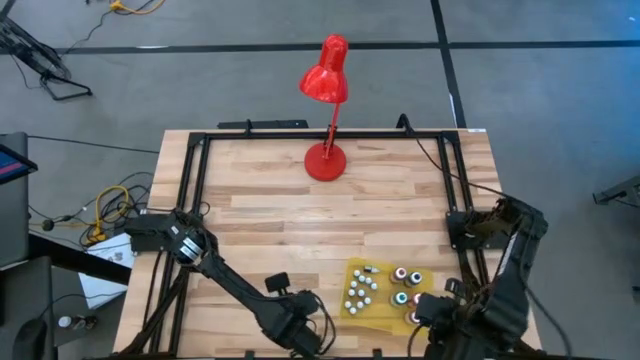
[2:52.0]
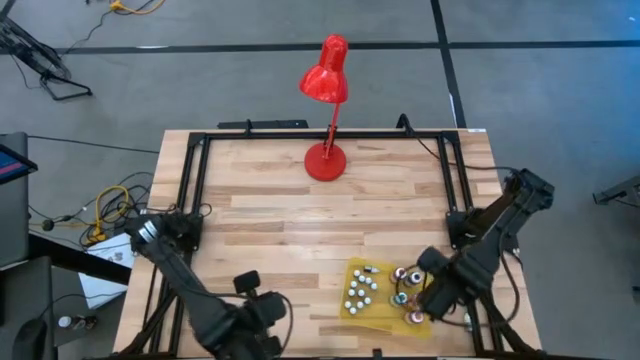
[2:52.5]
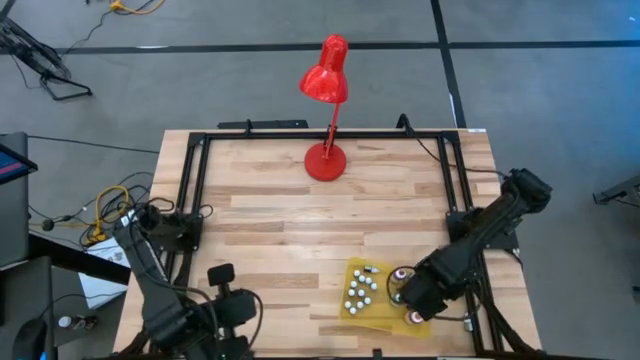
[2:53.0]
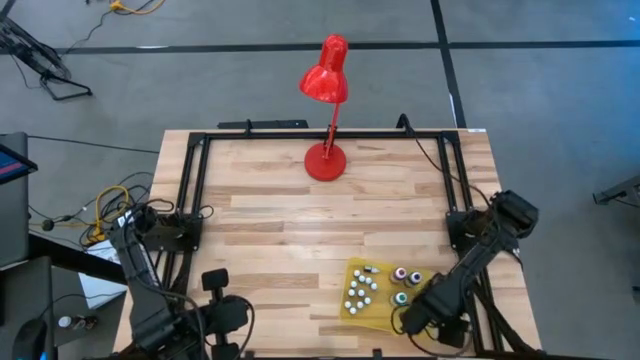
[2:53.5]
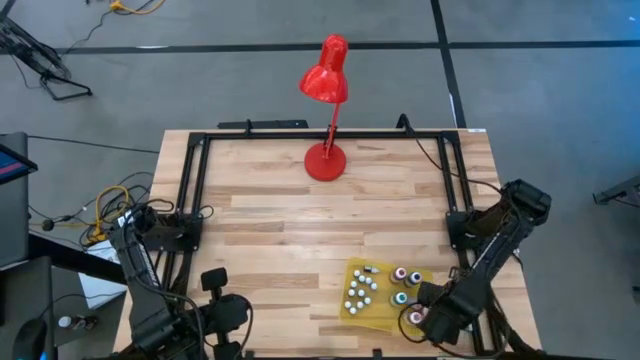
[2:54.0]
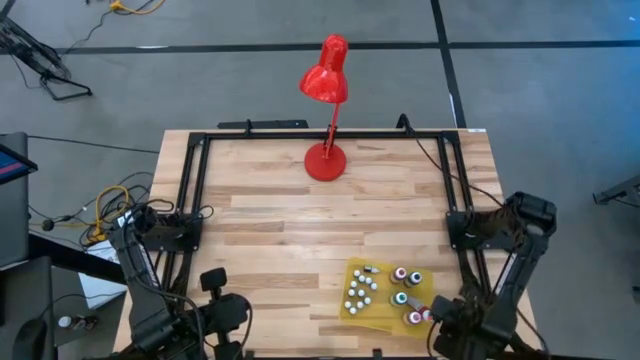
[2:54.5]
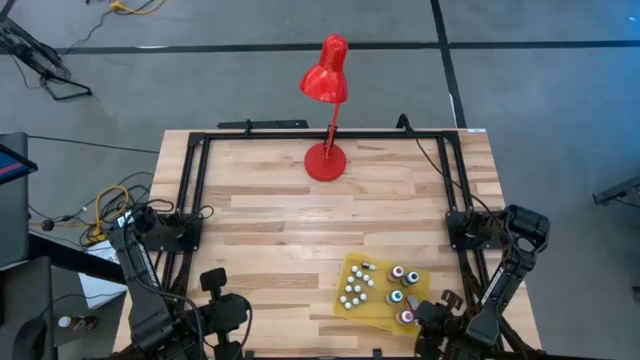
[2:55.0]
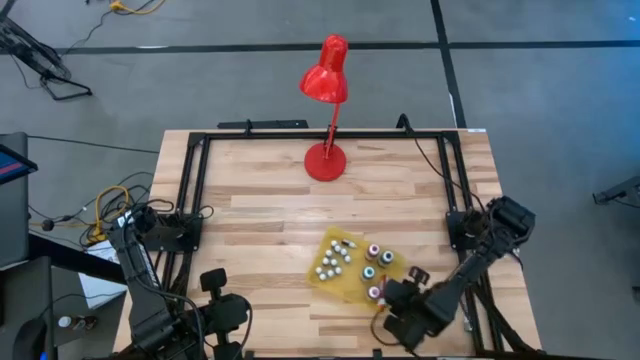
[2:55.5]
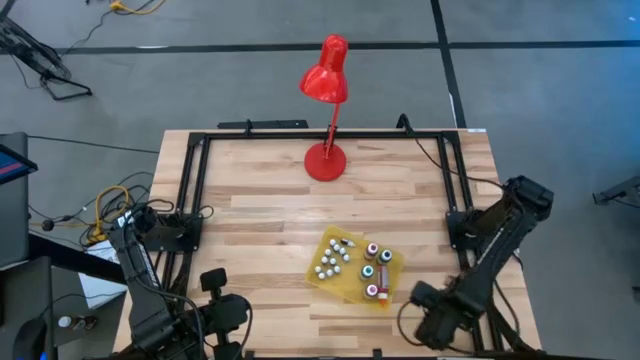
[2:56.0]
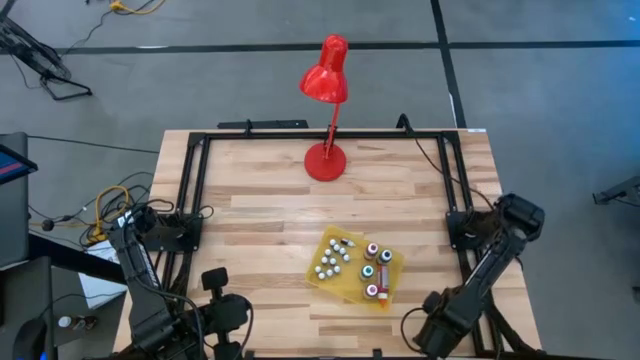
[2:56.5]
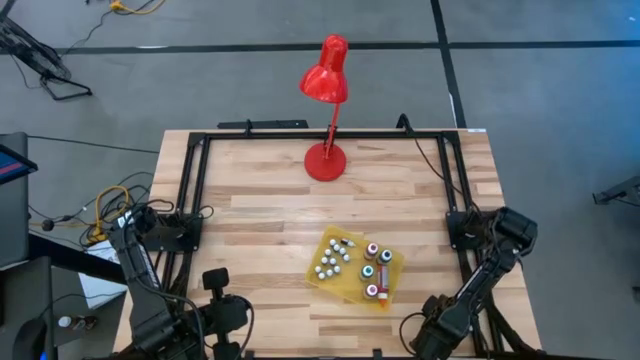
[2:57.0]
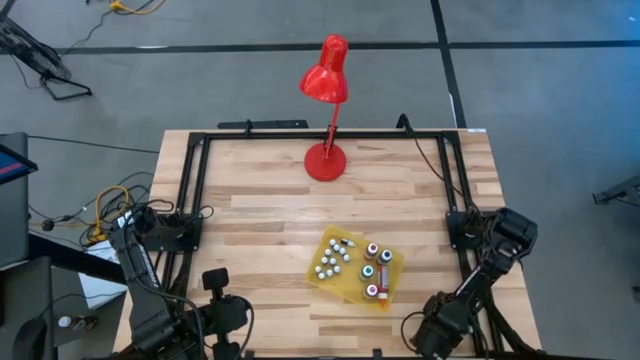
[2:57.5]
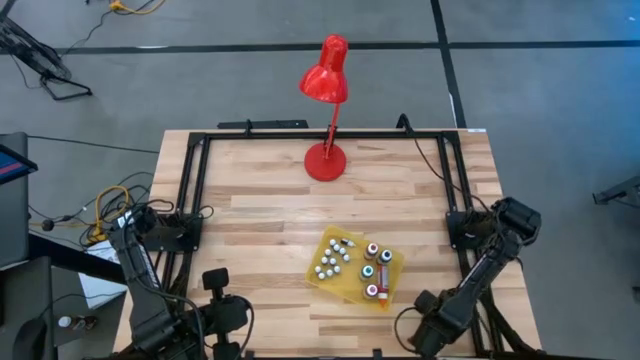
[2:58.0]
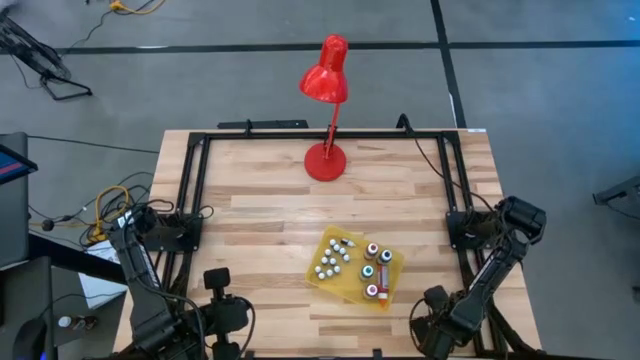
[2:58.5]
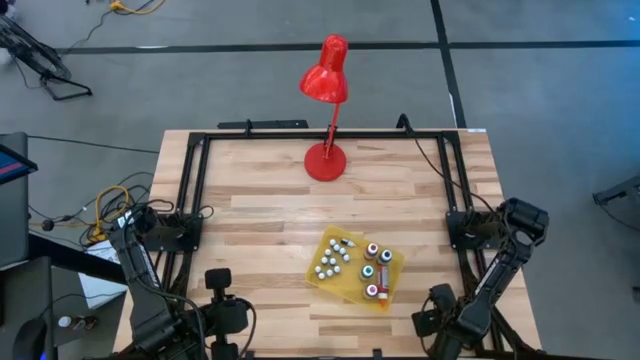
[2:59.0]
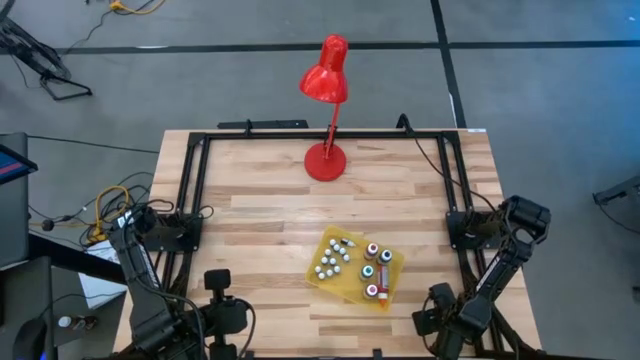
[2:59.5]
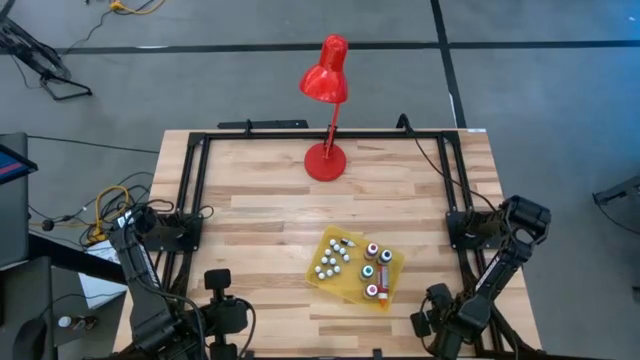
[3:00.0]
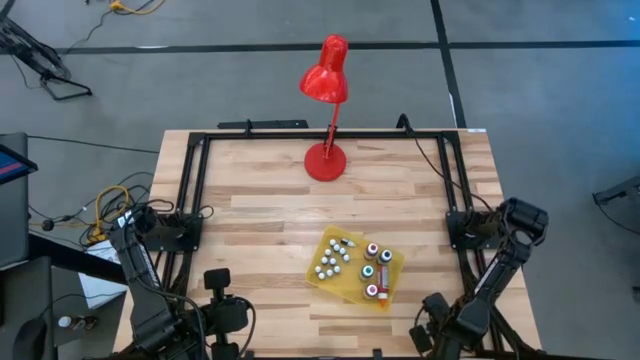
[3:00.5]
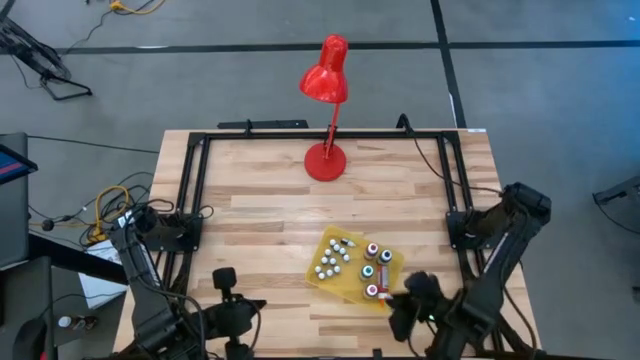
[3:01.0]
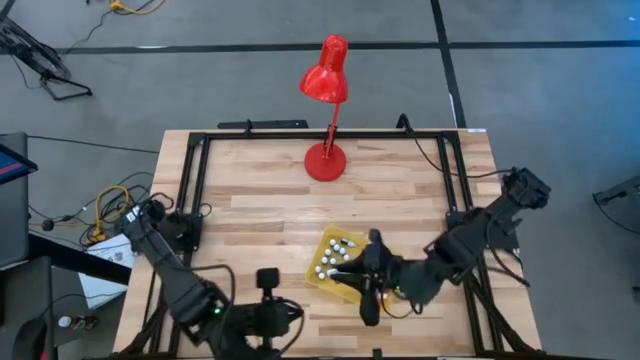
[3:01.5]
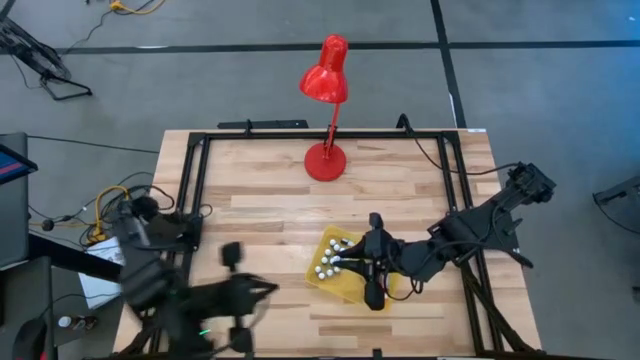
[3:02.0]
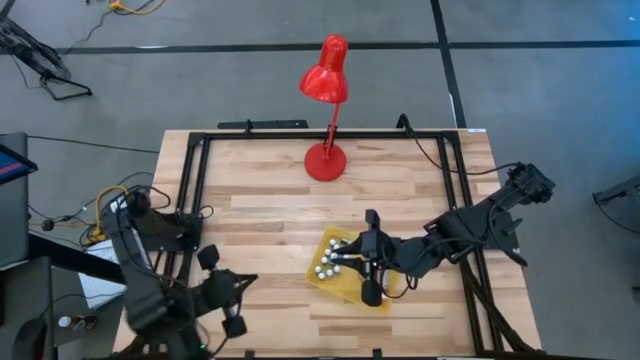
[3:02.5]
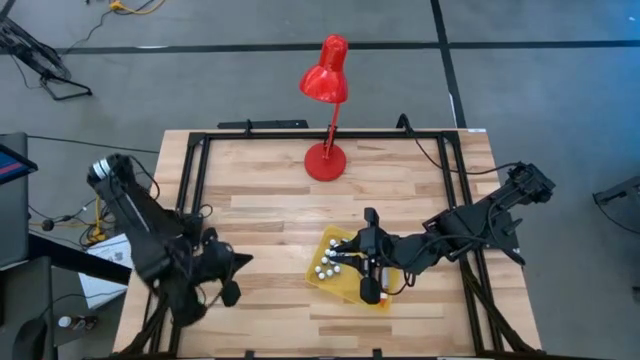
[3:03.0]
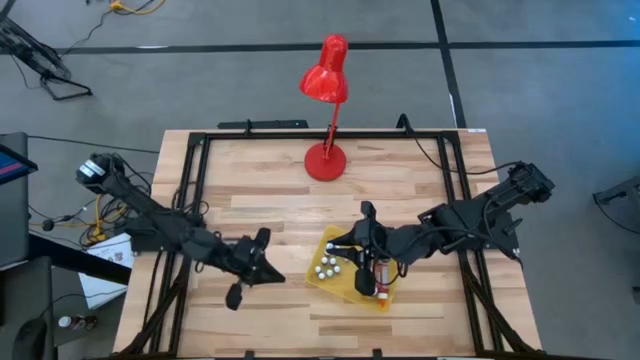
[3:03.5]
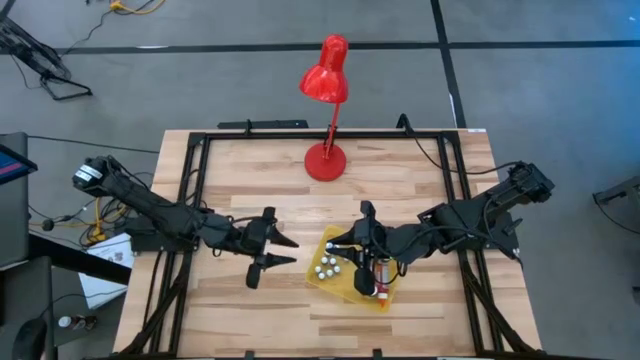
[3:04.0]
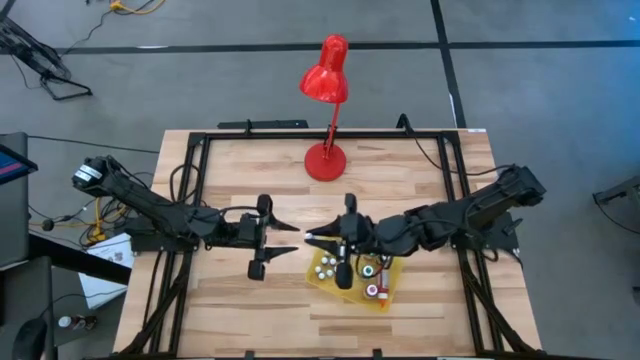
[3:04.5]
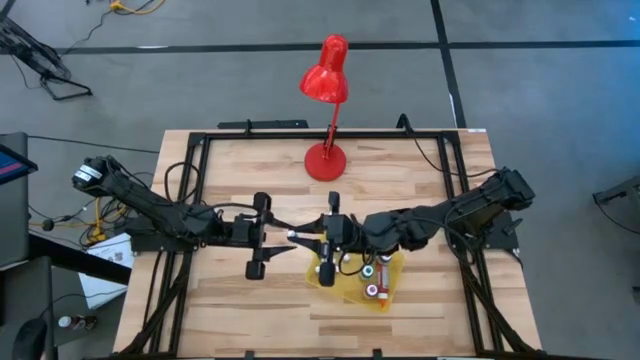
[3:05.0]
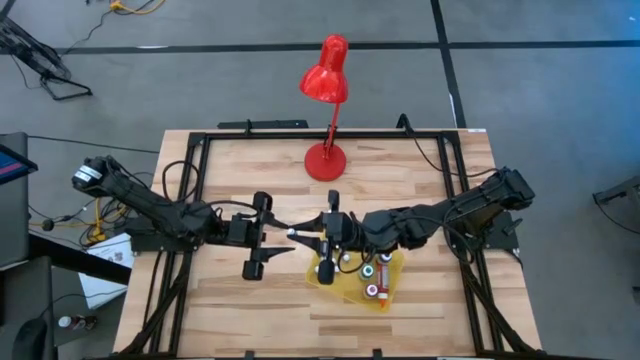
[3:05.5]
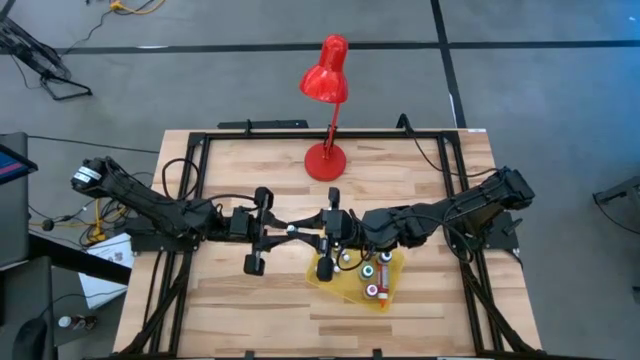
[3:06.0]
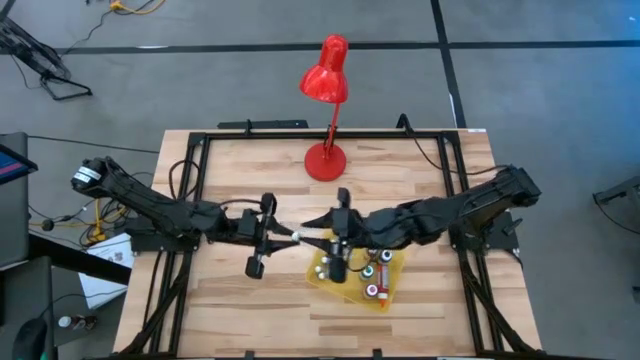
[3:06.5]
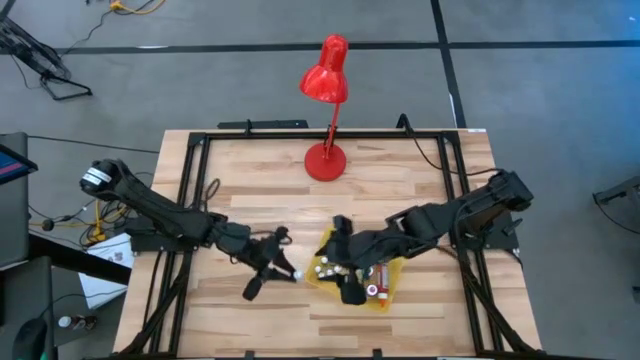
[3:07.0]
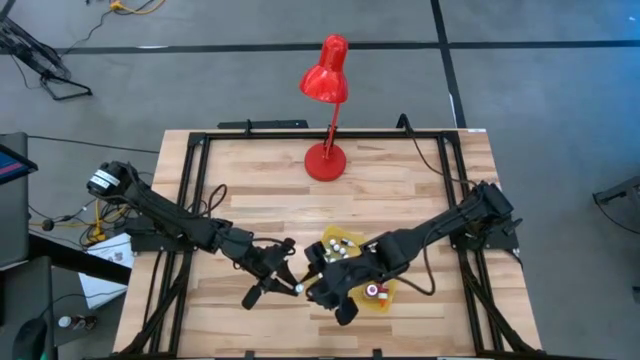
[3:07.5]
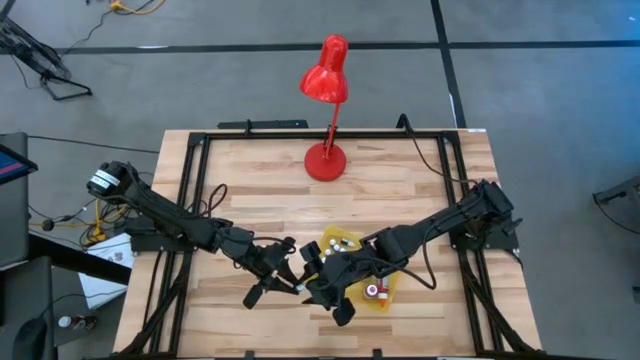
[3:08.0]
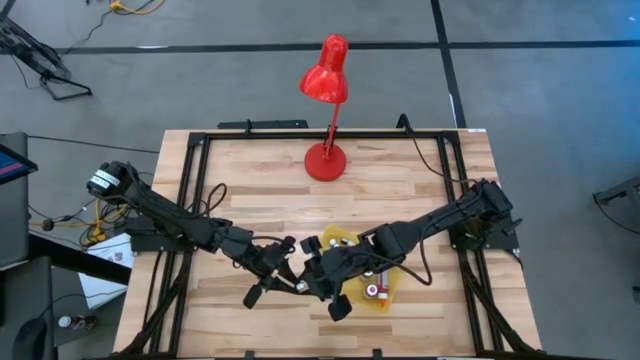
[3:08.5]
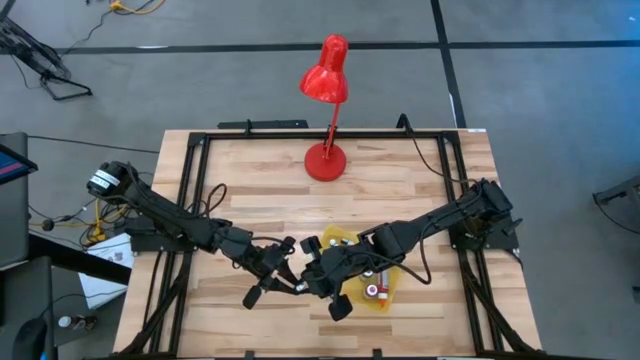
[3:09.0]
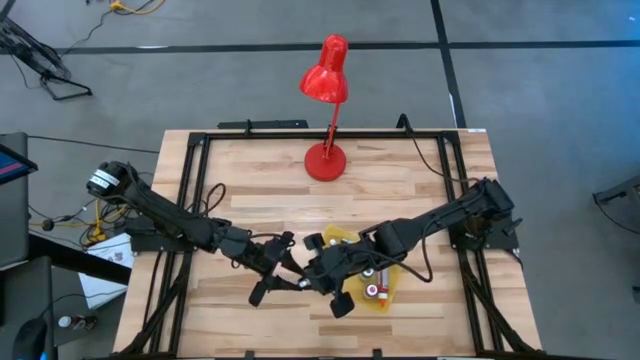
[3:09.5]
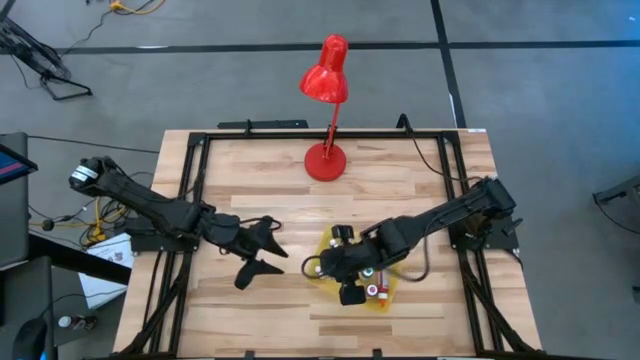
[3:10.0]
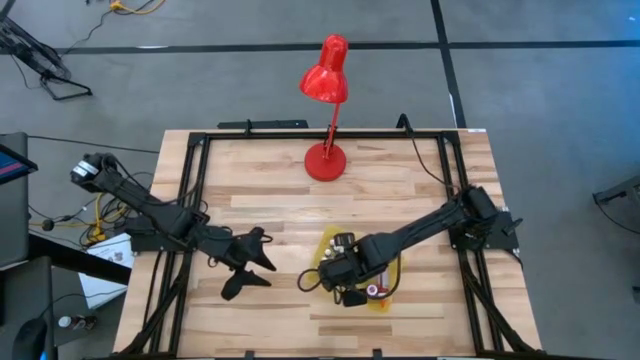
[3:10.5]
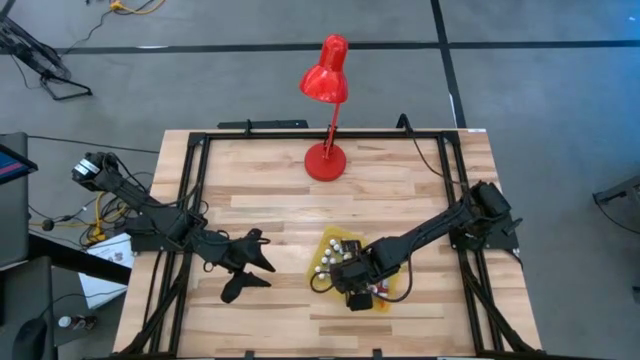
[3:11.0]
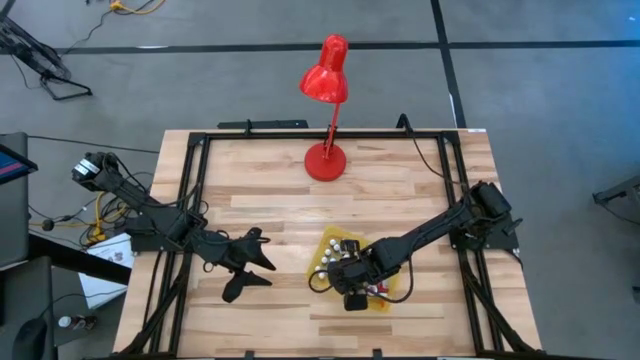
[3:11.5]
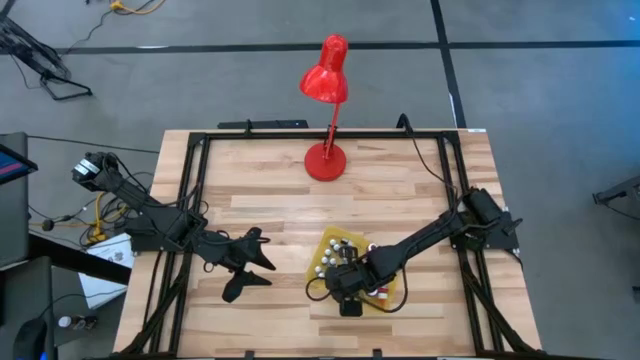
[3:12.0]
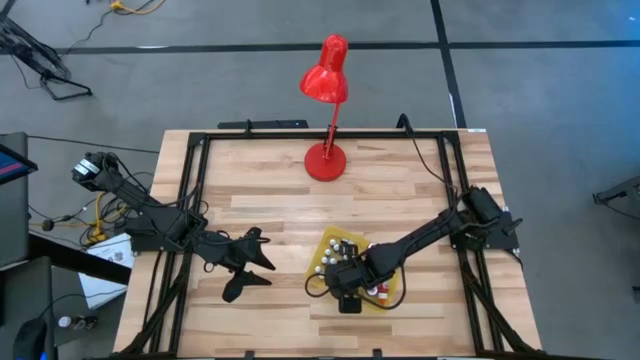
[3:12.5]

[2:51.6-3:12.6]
Task: Pick & Place food coloring
Put the green food coloring into the yellow bin
